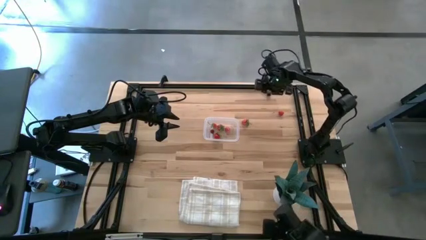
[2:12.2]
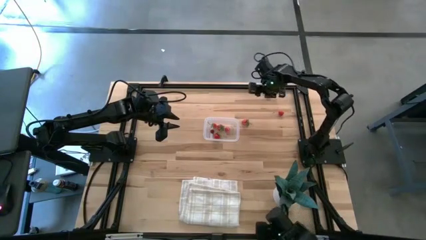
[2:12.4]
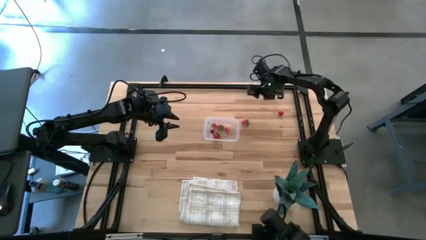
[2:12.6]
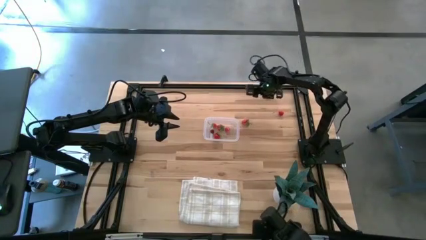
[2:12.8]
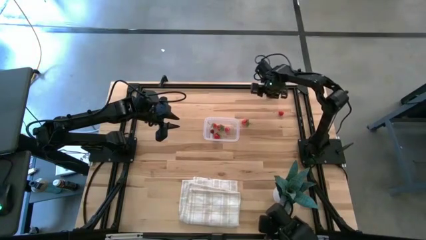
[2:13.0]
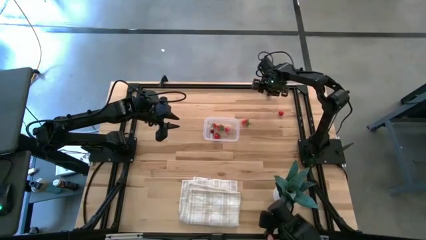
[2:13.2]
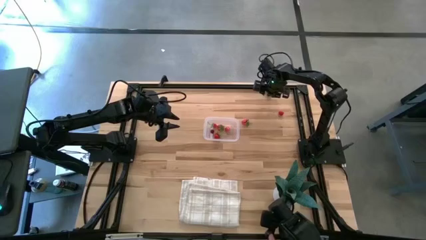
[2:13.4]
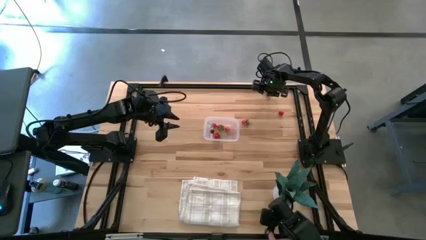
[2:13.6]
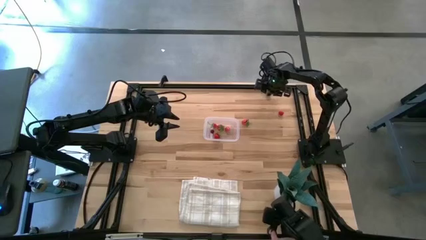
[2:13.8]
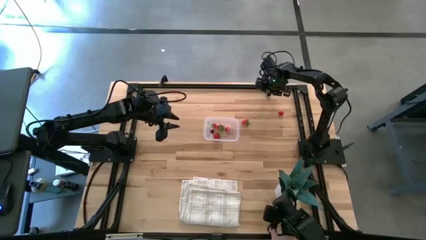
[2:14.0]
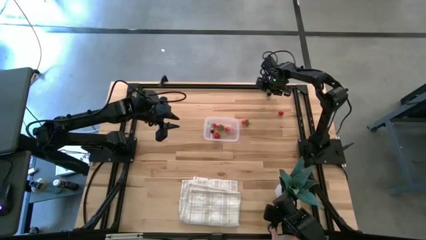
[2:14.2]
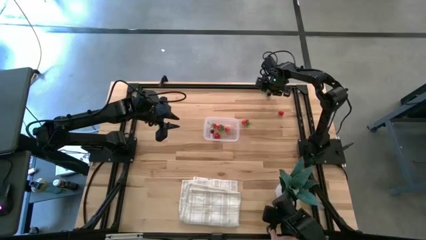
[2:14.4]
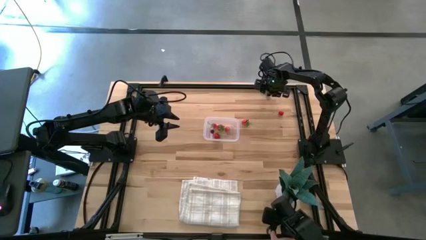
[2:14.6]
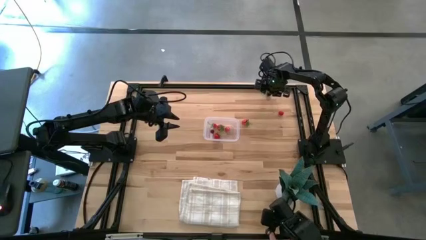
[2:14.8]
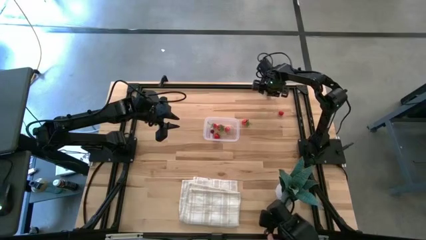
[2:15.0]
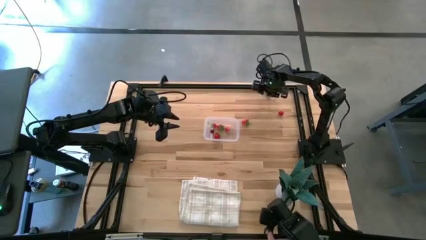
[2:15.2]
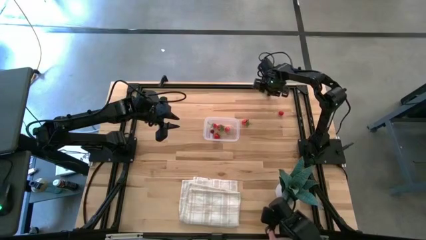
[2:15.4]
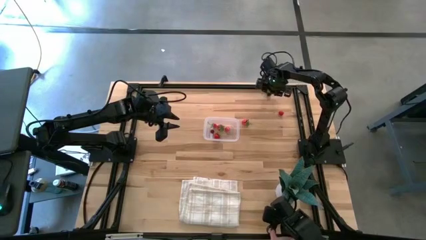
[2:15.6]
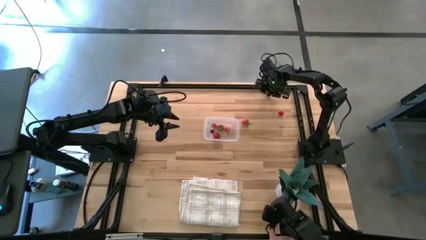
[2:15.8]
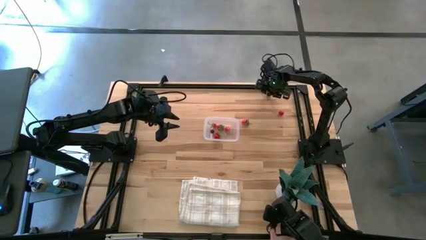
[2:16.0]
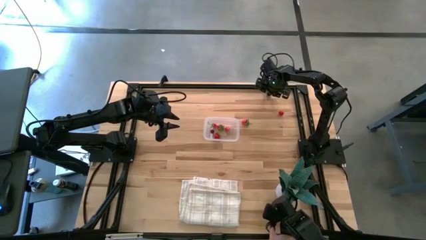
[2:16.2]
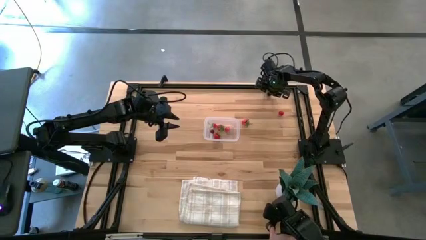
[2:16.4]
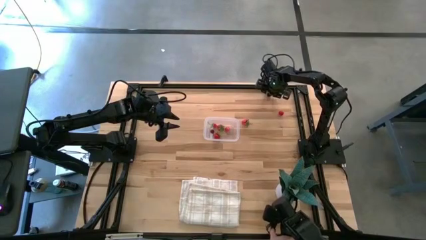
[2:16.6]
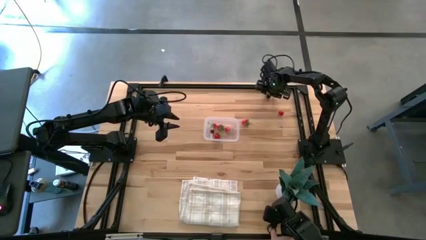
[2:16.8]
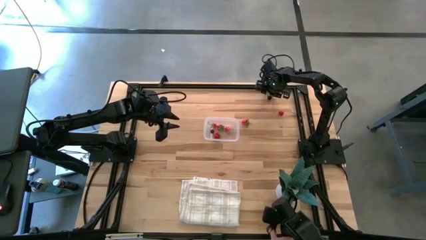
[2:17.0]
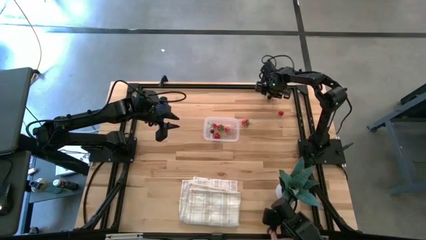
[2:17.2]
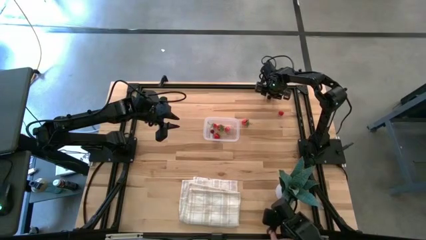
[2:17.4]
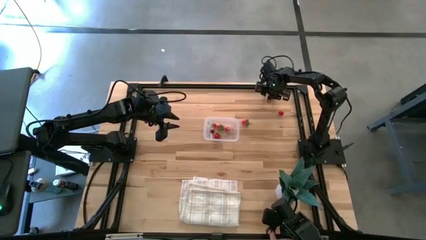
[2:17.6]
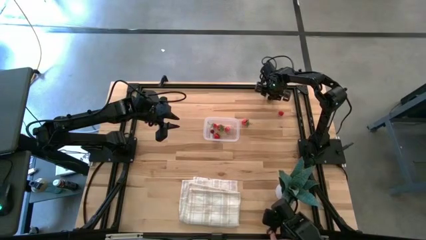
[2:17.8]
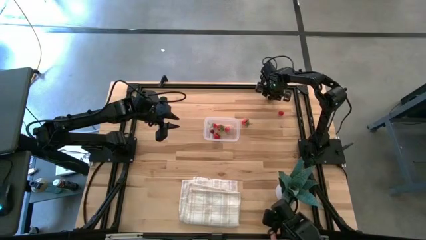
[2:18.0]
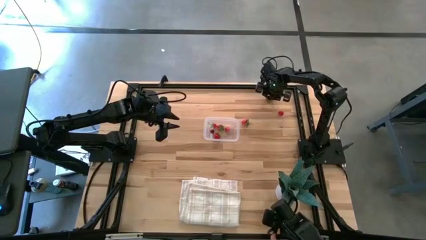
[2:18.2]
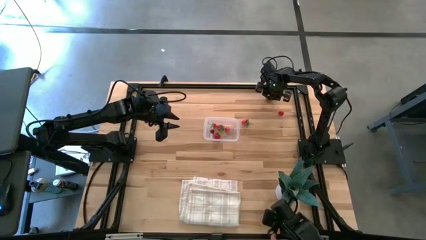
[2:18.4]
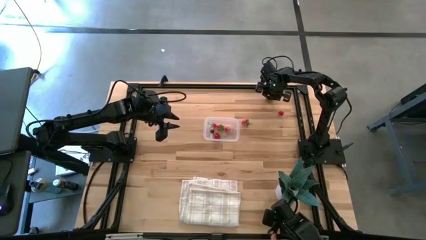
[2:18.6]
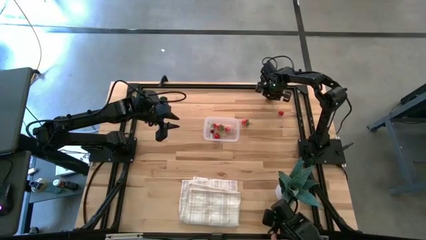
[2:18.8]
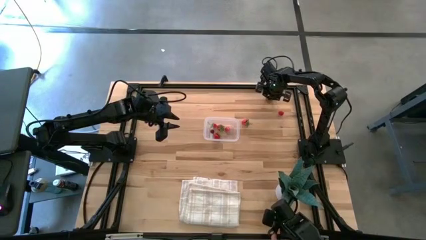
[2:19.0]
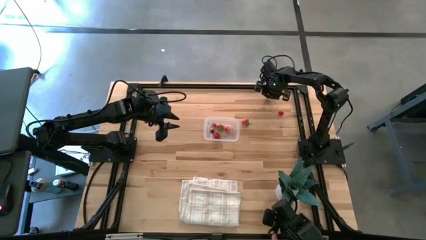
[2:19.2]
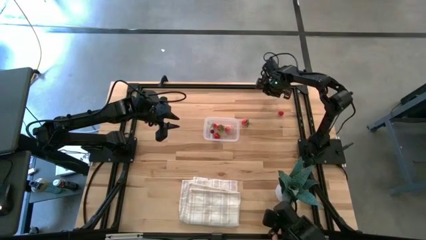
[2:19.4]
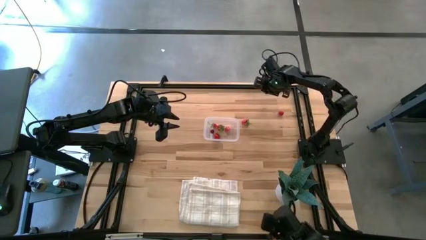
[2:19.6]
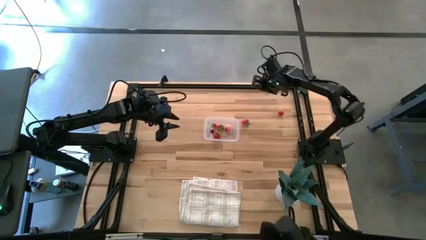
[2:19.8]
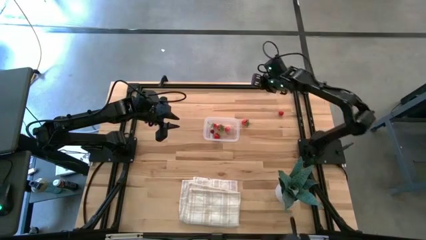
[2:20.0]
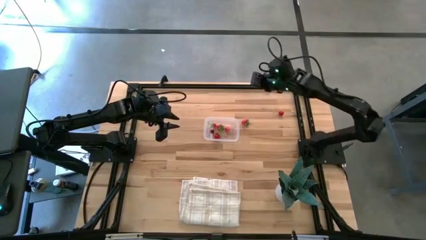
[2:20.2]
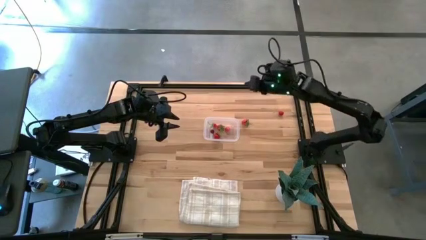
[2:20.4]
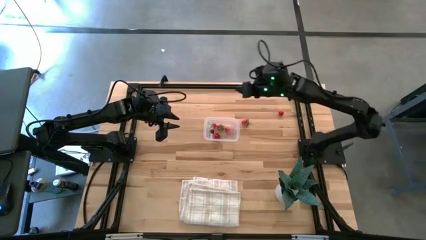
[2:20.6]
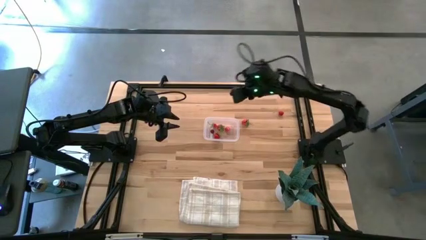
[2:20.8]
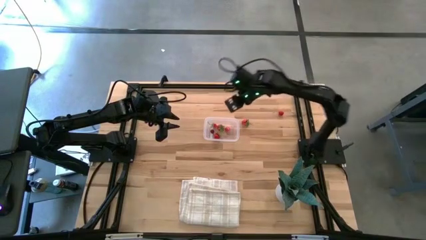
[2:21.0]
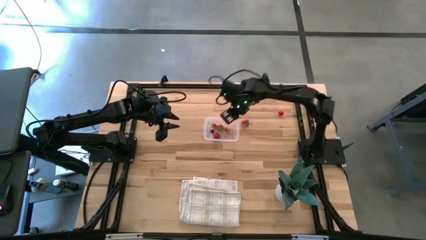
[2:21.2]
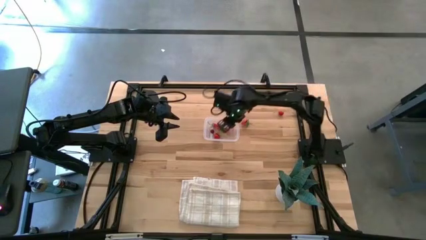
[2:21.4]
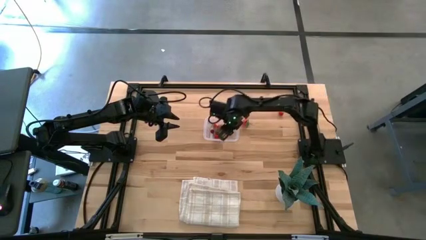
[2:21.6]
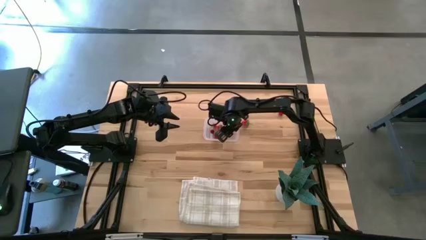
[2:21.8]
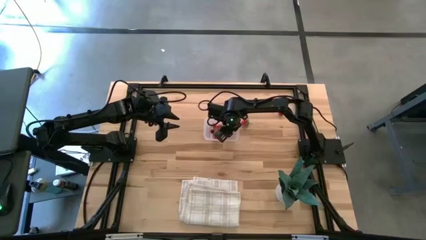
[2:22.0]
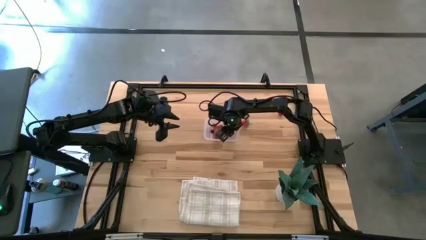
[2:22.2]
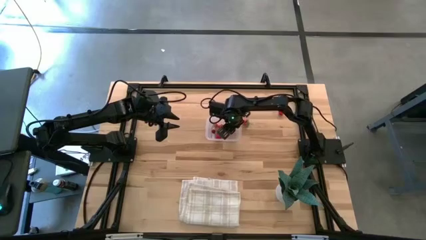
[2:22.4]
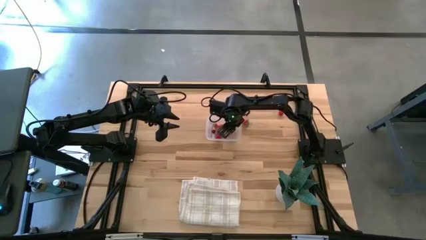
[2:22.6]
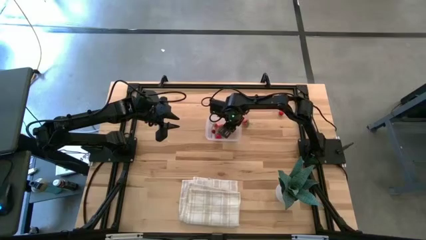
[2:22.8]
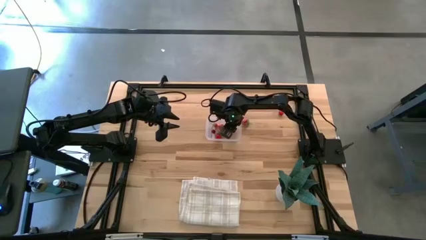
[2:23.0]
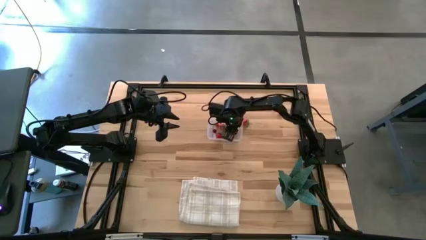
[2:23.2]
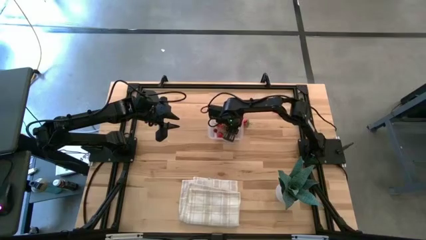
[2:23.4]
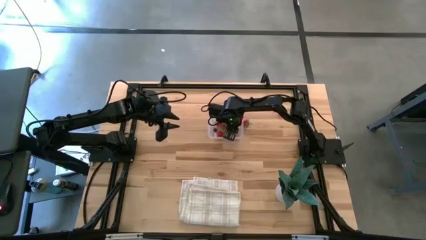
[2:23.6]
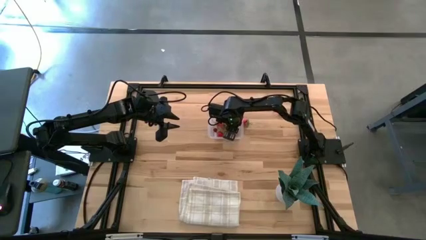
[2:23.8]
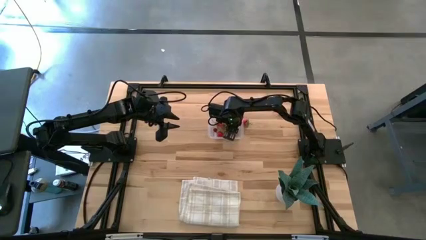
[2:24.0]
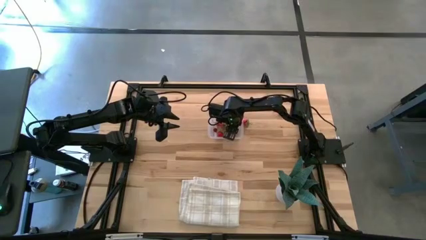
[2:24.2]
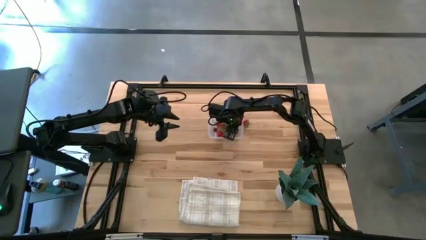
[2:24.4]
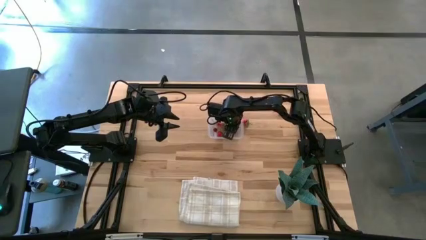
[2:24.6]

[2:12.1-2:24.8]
Task: Pick and placing Produce into tupperware
Put the black cherry into the transparent bin
